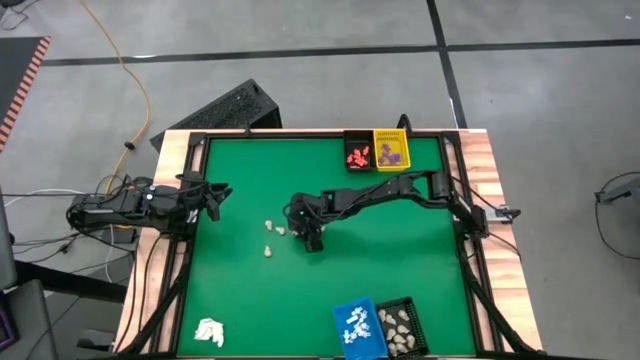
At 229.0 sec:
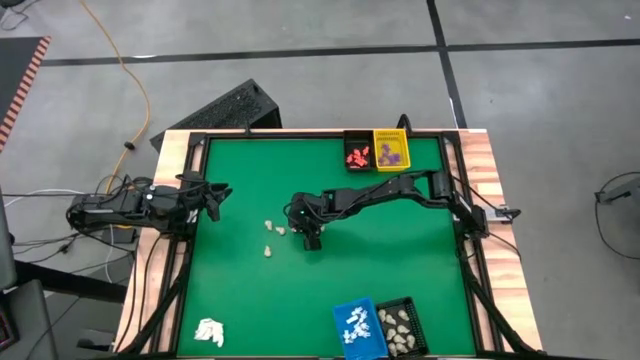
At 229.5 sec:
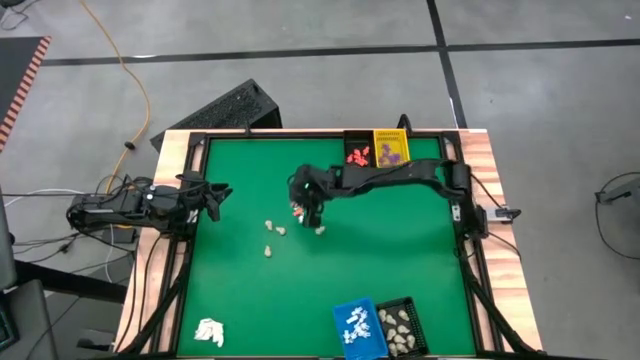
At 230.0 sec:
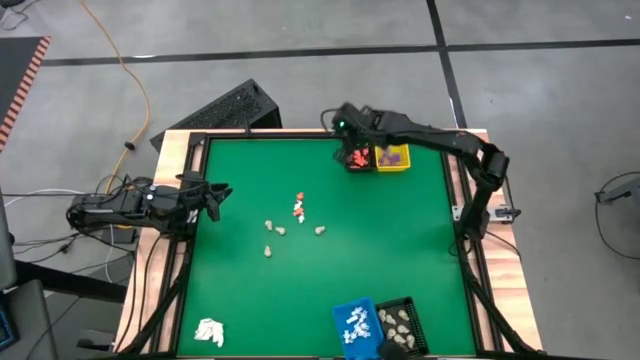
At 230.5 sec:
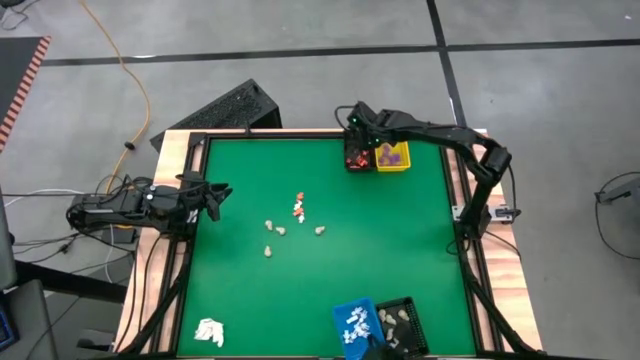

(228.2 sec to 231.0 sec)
Task: Sort Halloween decoration
Put the orange skeleton toy into the top black basket

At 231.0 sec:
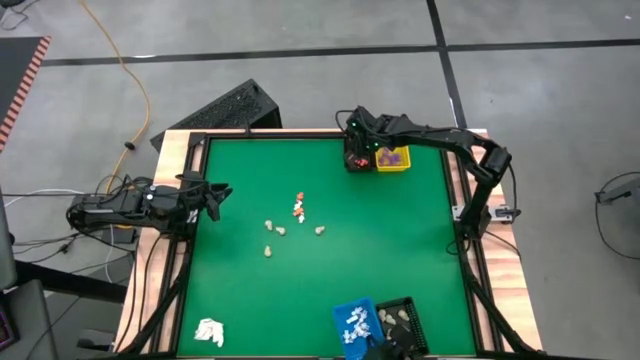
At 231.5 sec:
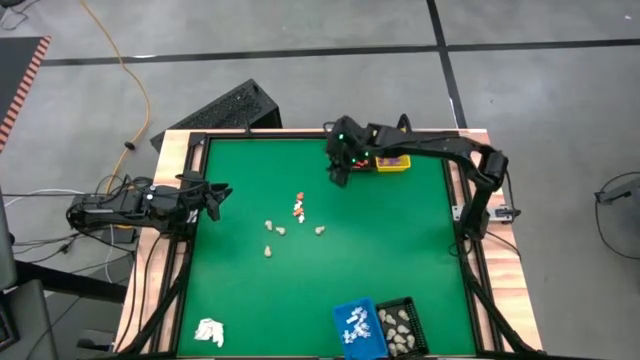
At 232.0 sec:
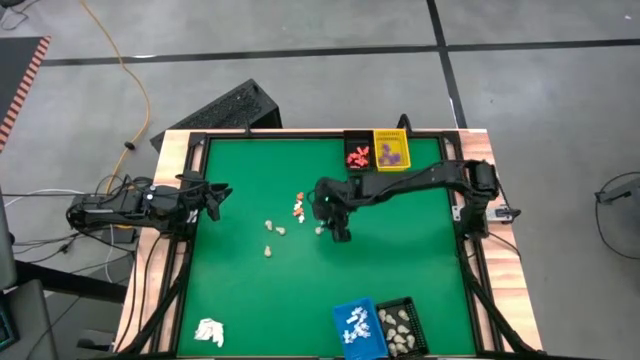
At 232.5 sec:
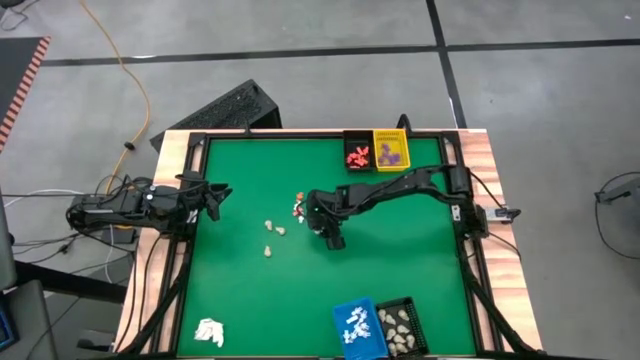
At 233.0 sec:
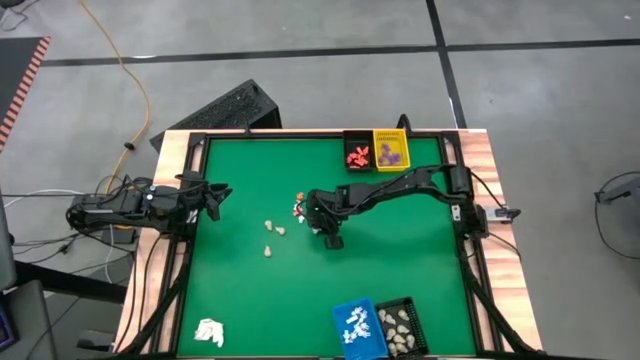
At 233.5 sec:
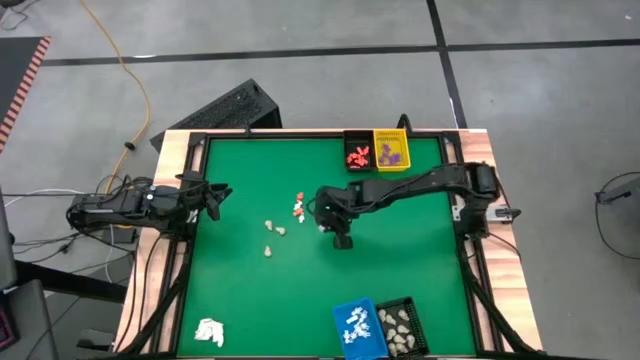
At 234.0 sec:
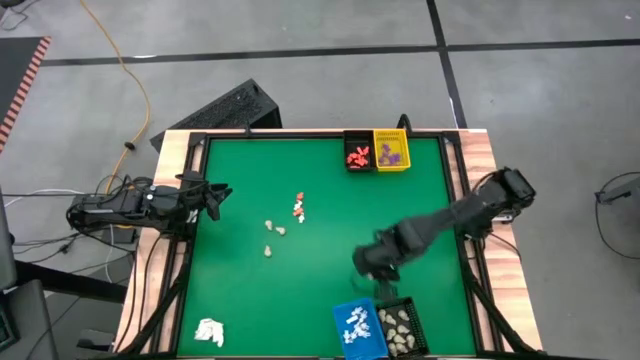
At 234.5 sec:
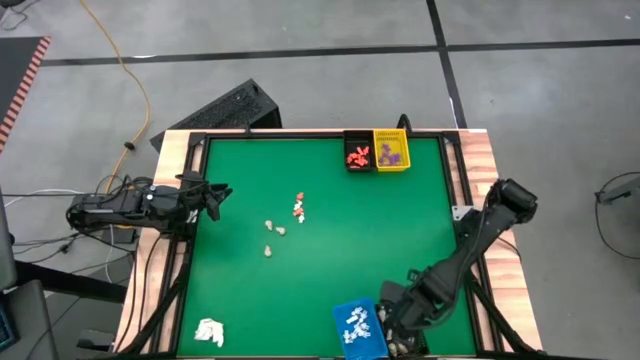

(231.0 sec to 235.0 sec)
Put the white skull toy into the bottom black basket

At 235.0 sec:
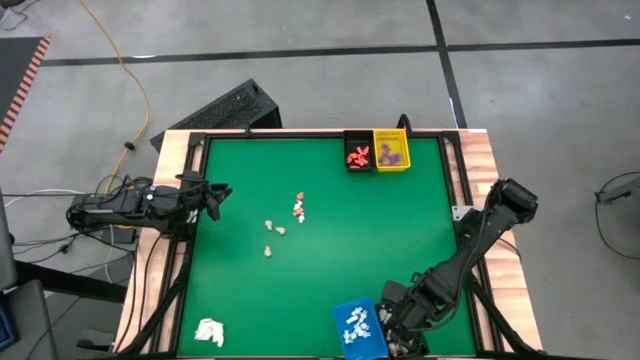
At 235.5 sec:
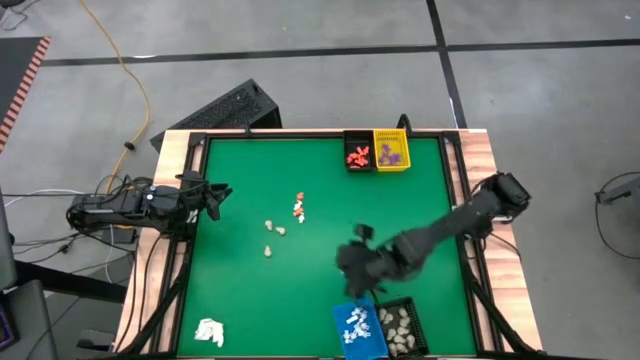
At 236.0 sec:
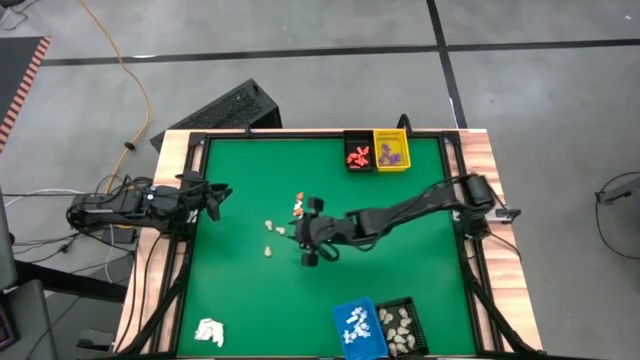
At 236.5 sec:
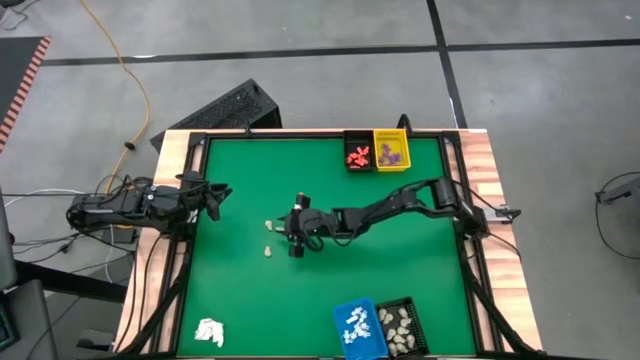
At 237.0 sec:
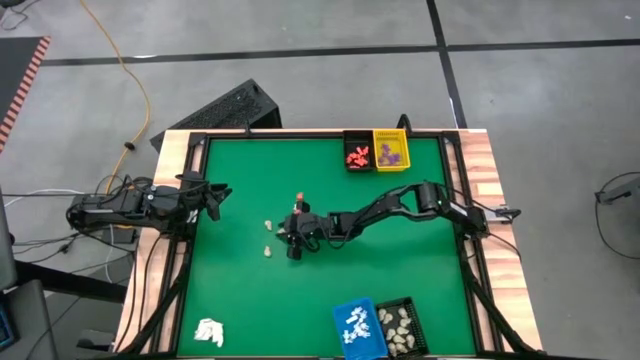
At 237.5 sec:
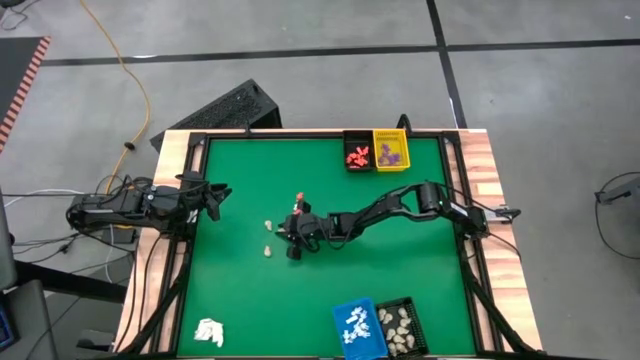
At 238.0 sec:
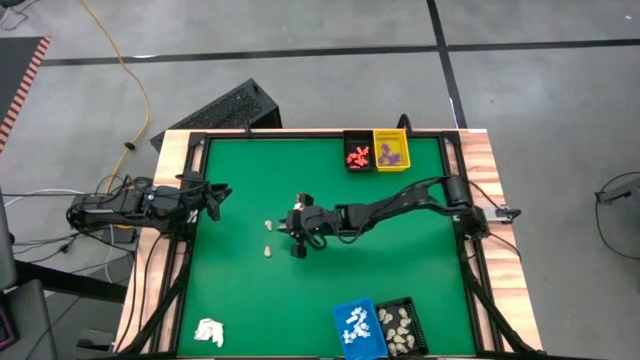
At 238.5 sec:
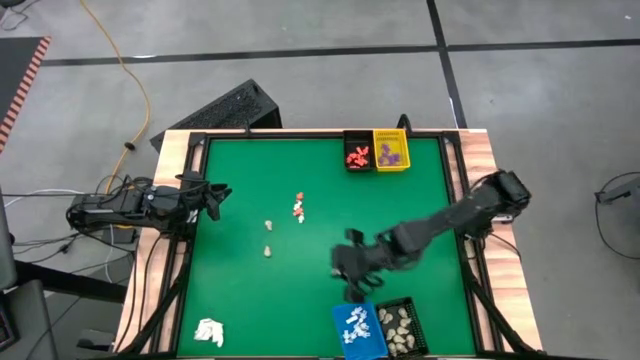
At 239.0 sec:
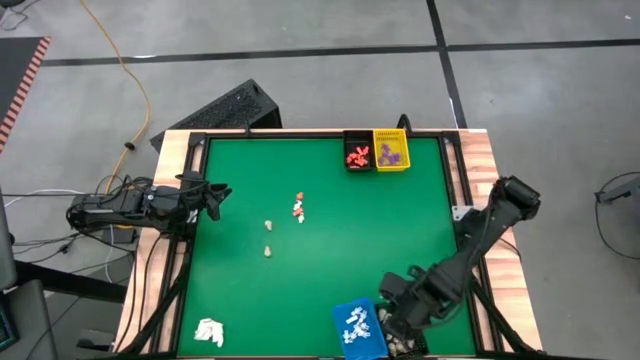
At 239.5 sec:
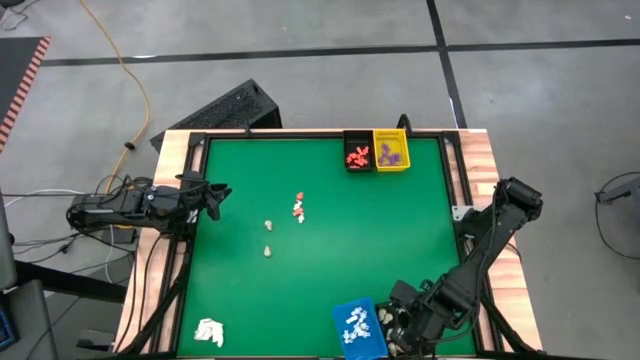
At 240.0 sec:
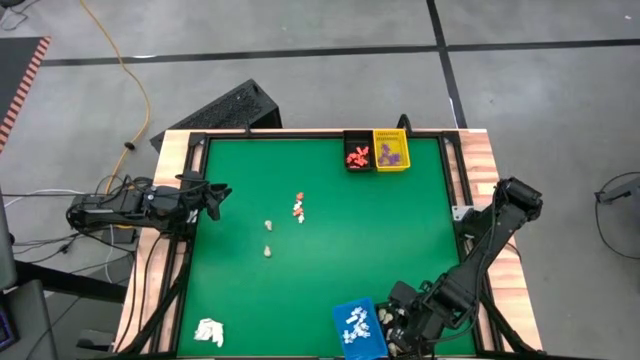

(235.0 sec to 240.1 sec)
Put the white skull toy into the bottom black basket

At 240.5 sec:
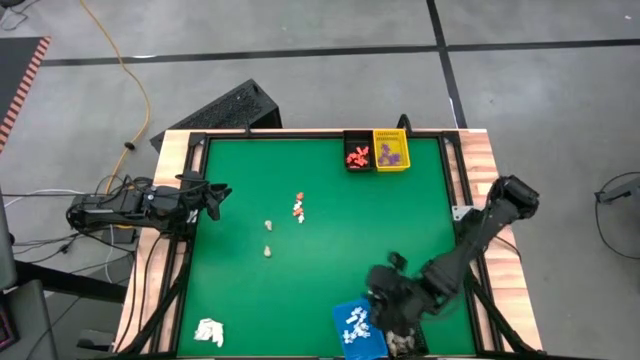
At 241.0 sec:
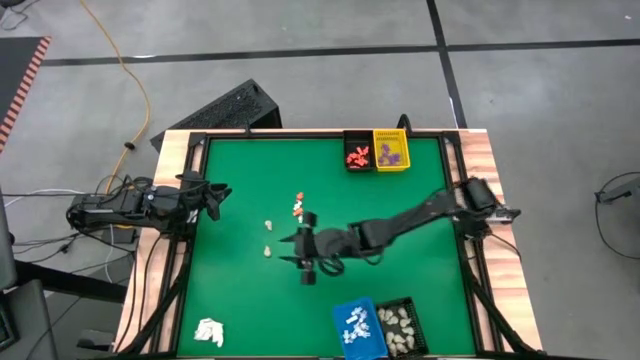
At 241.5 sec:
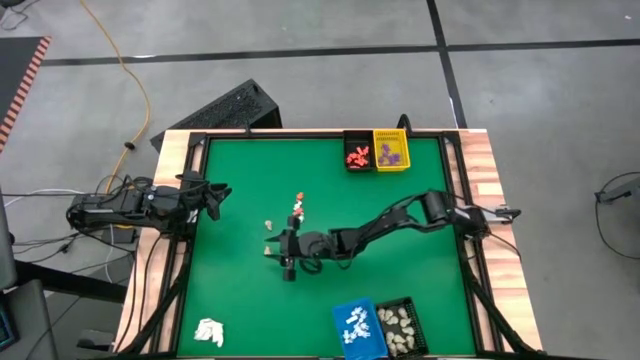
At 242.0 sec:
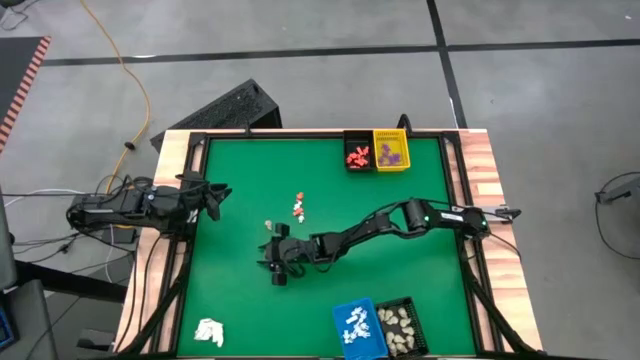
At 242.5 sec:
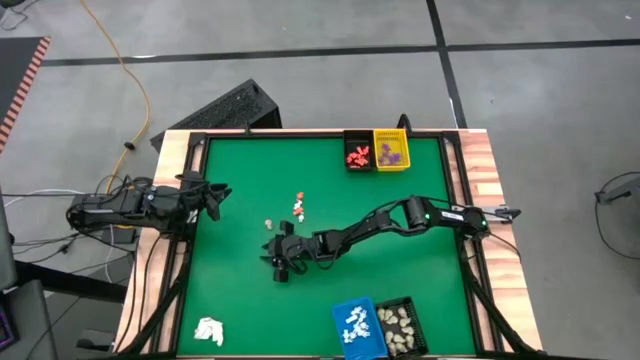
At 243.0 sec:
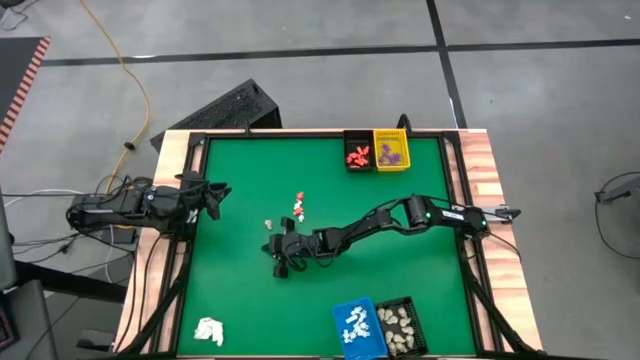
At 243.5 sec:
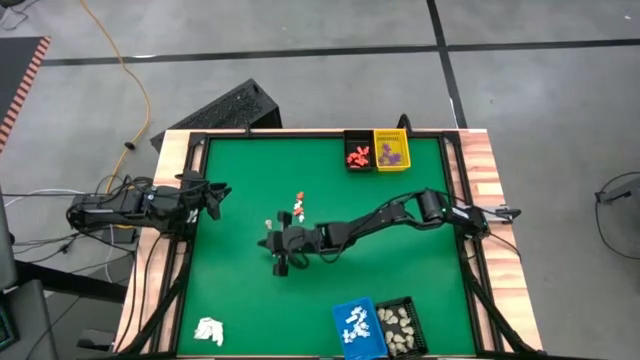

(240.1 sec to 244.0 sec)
Put the white skull toy into the bottom black basket

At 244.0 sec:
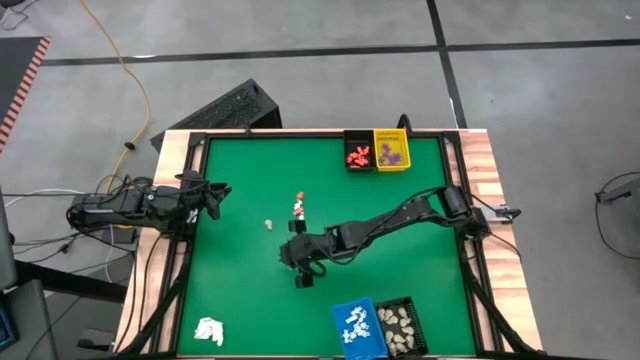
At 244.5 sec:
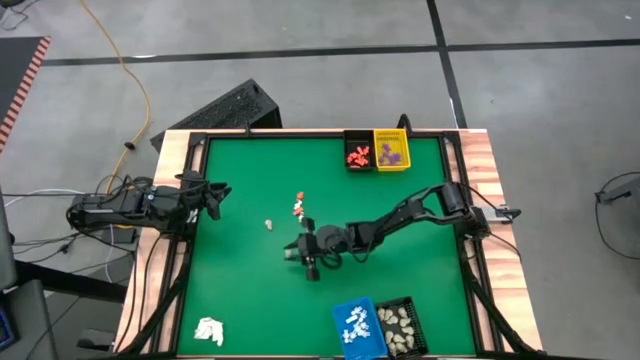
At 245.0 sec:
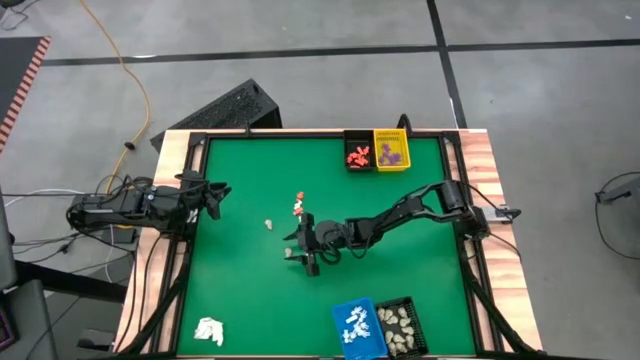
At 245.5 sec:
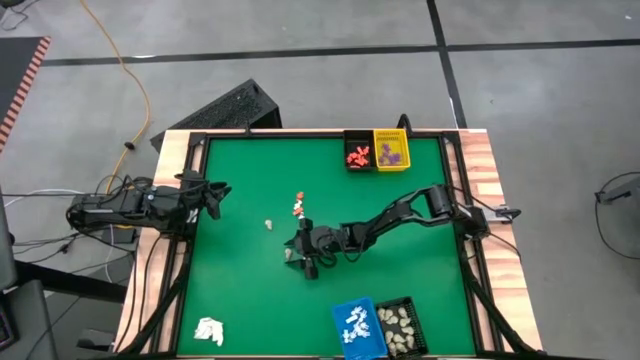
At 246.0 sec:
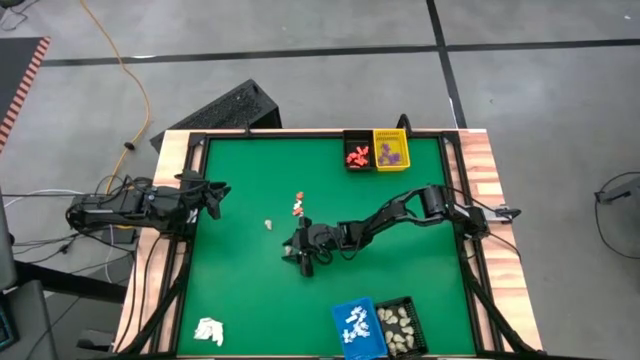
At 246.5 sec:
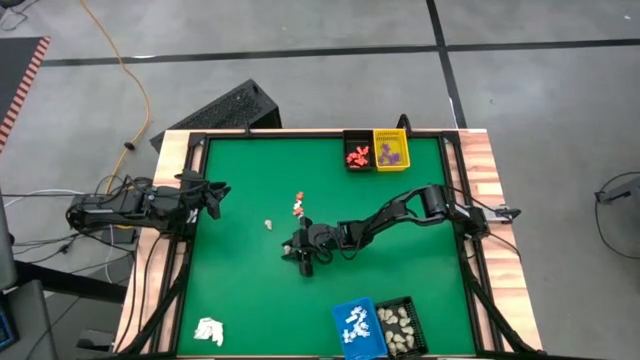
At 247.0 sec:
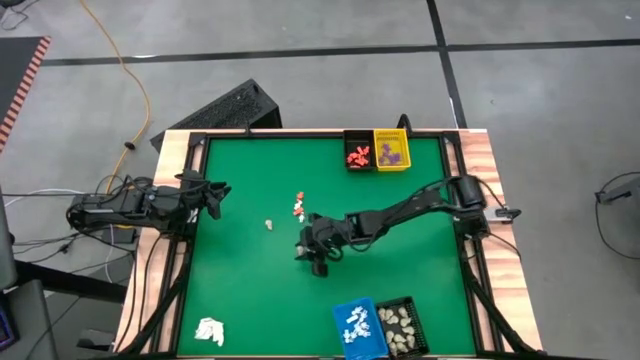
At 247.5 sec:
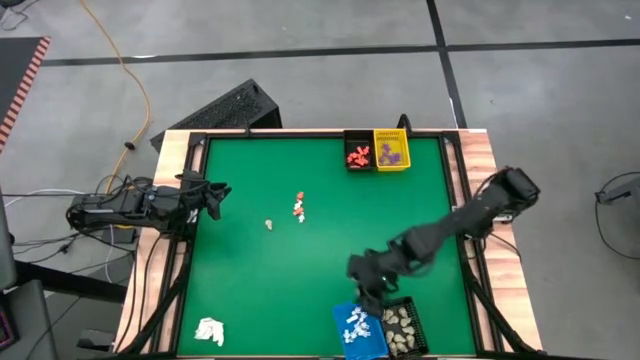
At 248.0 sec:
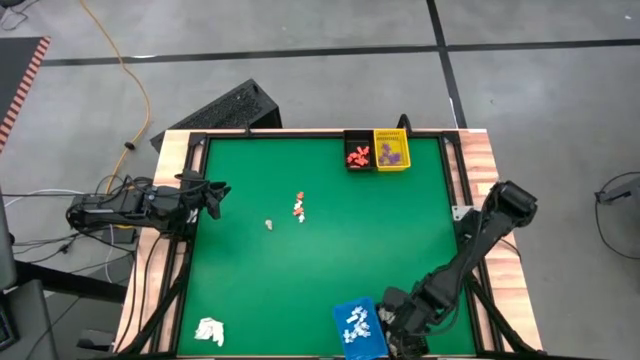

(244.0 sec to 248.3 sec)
Put the white skull toy into the bottom black basket

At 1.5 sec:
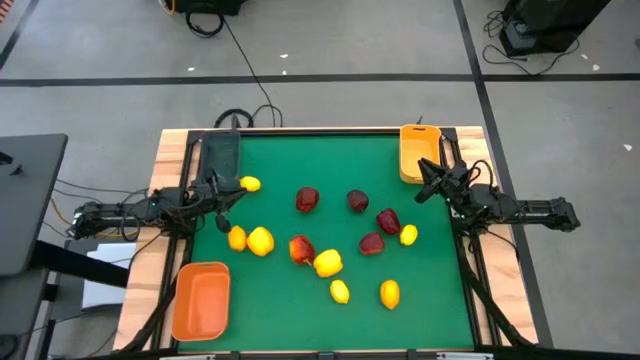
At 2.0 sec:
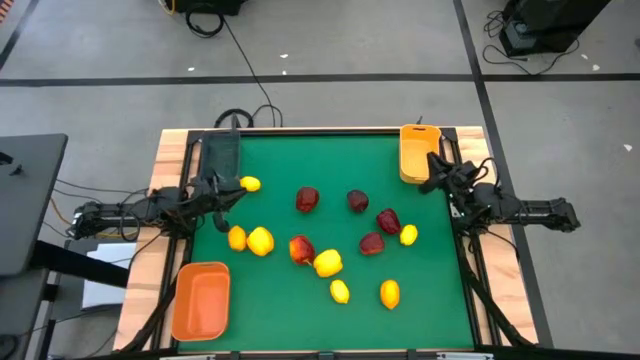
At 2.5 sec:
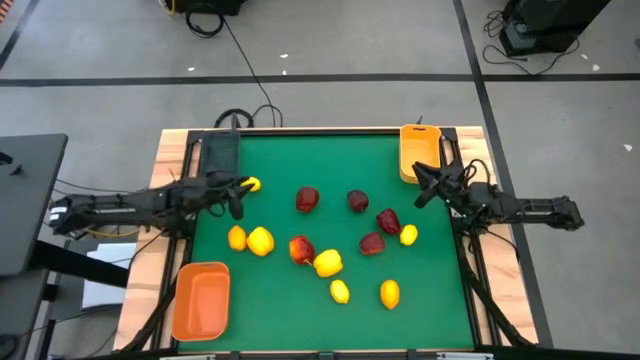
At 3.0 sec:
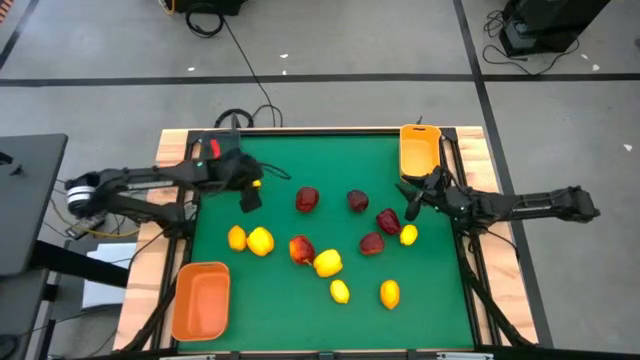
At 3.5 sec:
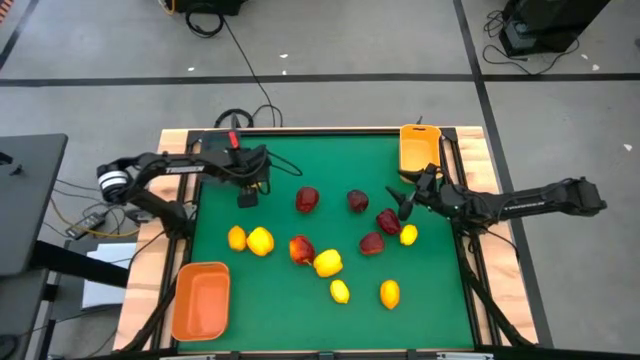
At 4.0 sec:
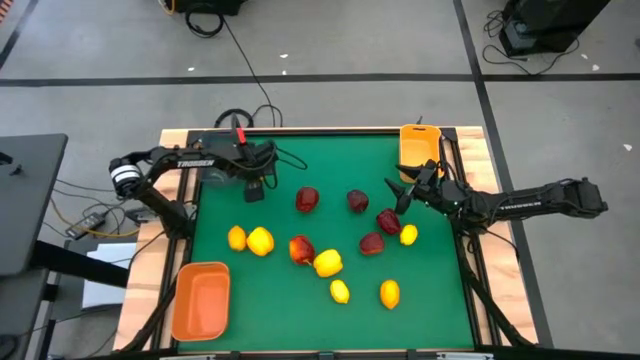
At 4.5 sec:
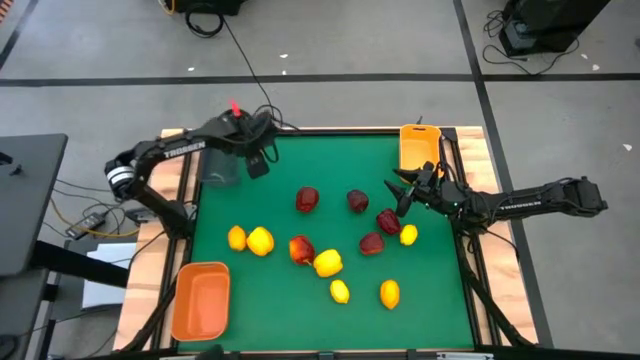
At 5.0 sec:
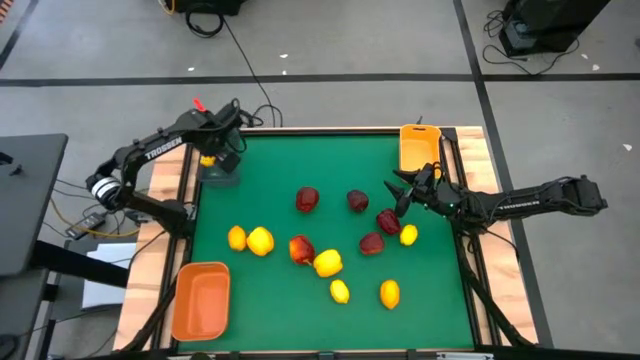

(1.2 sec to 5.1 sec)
Task: Sort produce into baskets
Put the lemon into the black bin
